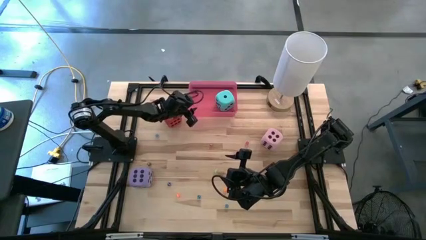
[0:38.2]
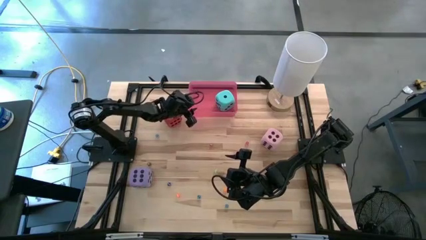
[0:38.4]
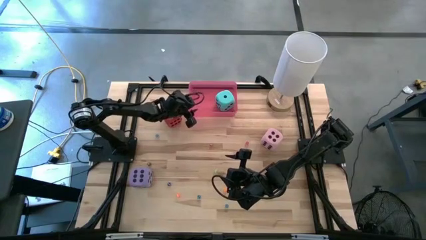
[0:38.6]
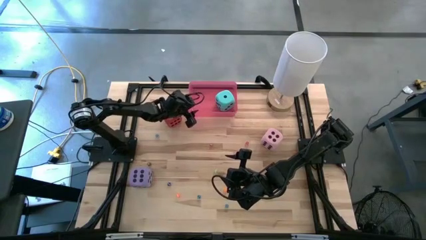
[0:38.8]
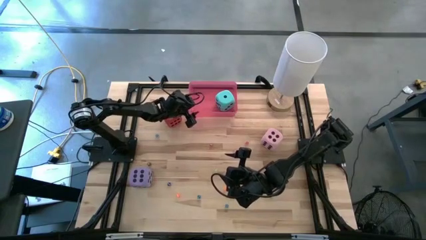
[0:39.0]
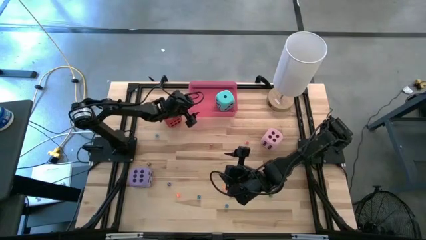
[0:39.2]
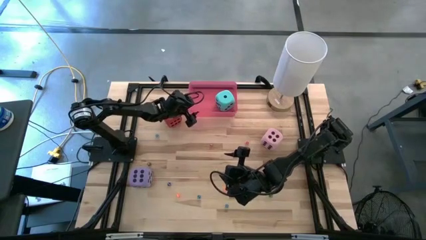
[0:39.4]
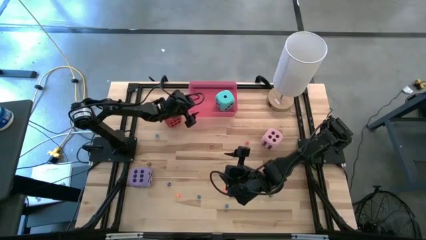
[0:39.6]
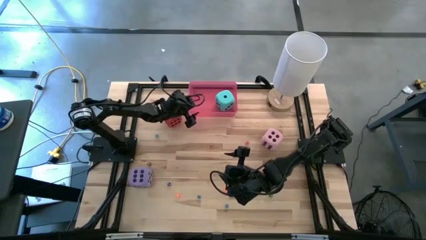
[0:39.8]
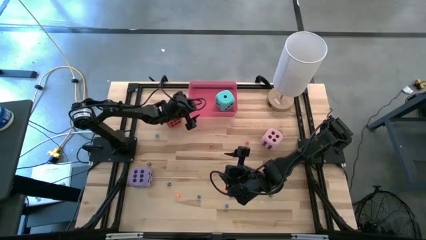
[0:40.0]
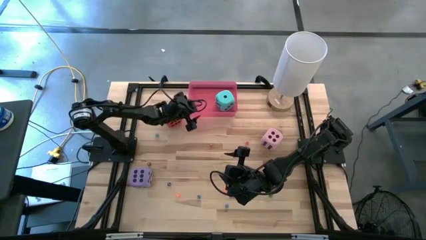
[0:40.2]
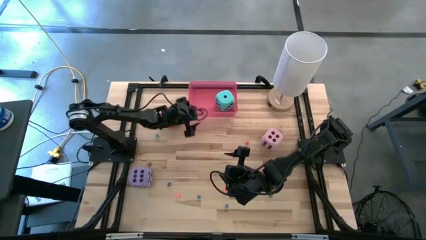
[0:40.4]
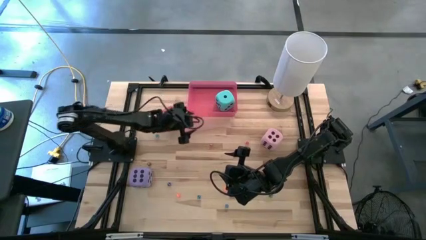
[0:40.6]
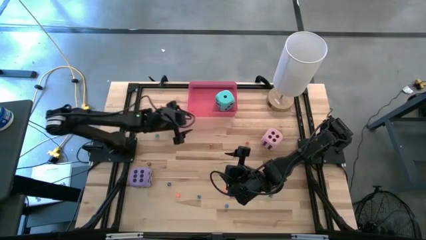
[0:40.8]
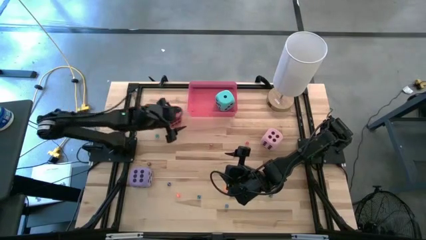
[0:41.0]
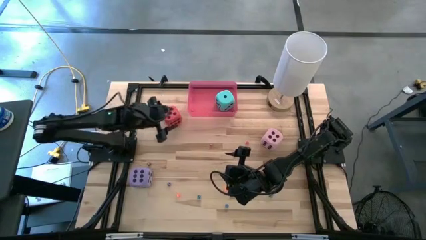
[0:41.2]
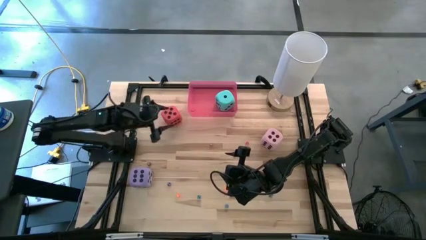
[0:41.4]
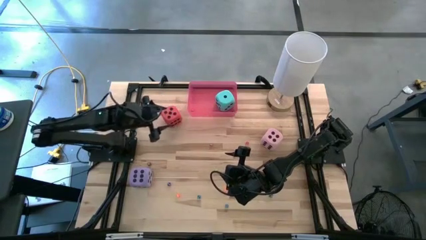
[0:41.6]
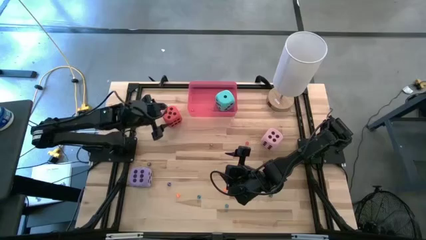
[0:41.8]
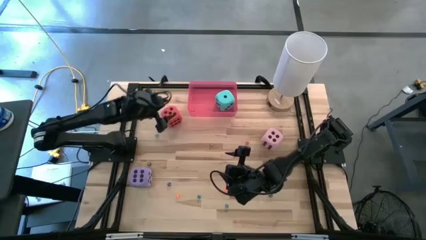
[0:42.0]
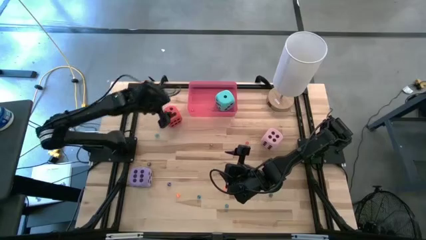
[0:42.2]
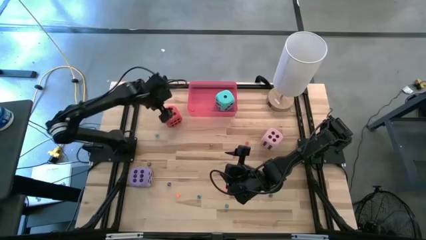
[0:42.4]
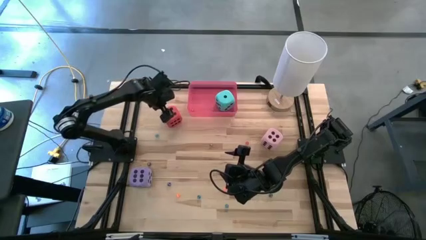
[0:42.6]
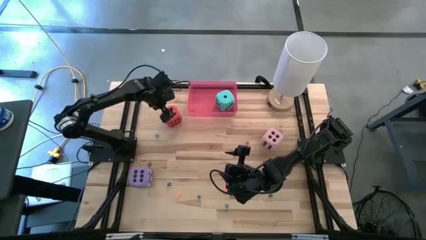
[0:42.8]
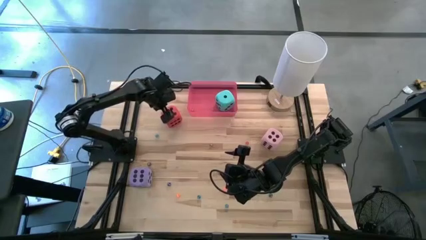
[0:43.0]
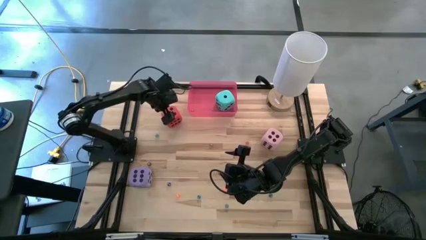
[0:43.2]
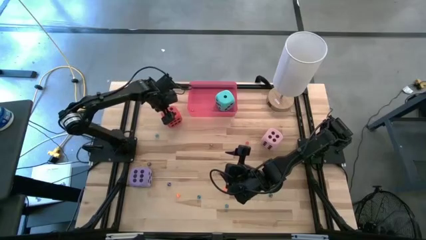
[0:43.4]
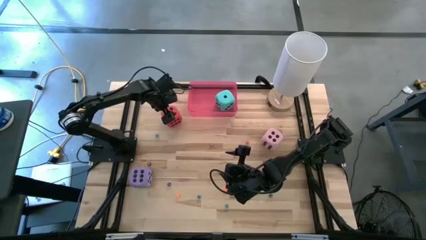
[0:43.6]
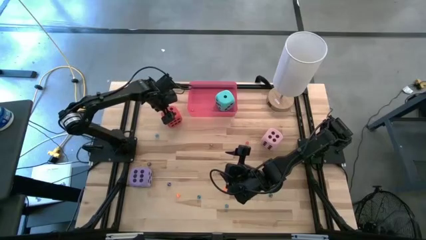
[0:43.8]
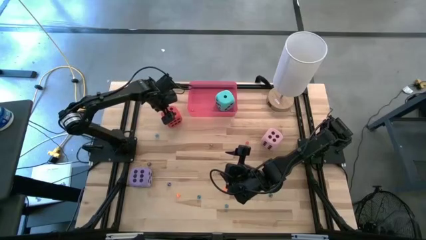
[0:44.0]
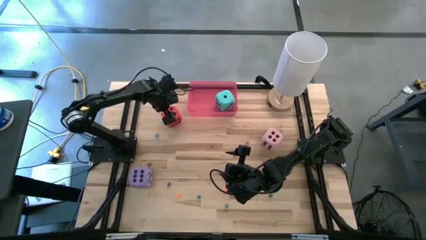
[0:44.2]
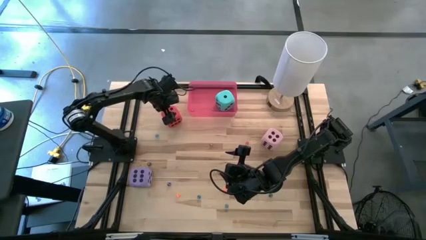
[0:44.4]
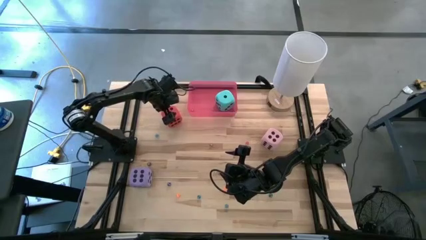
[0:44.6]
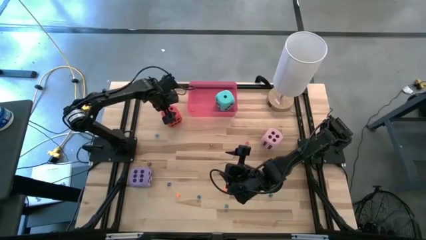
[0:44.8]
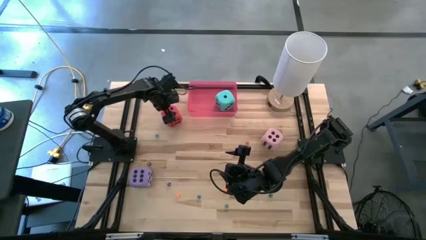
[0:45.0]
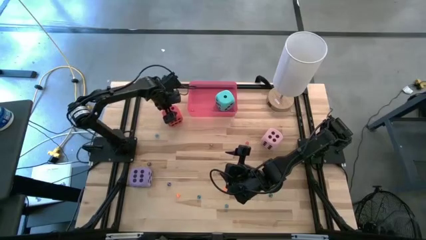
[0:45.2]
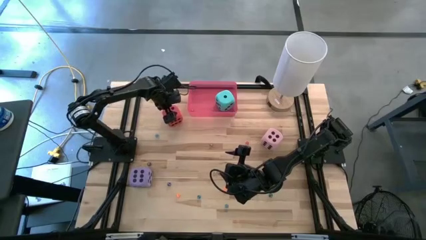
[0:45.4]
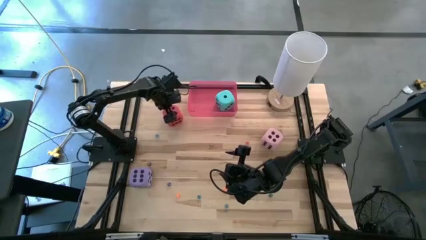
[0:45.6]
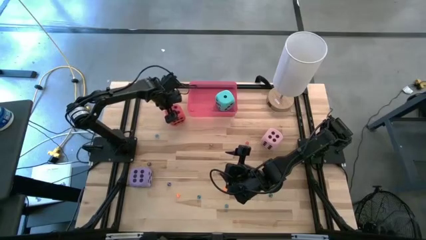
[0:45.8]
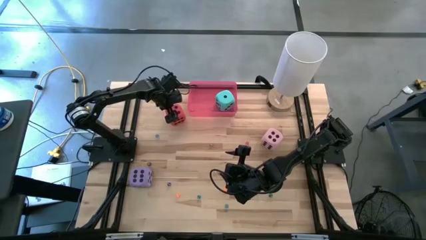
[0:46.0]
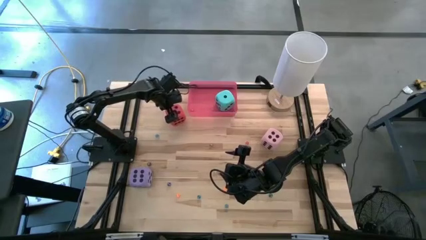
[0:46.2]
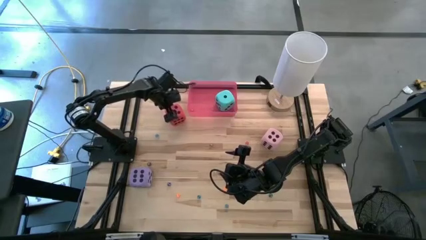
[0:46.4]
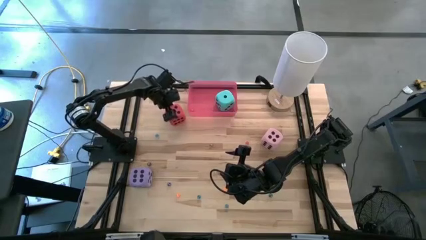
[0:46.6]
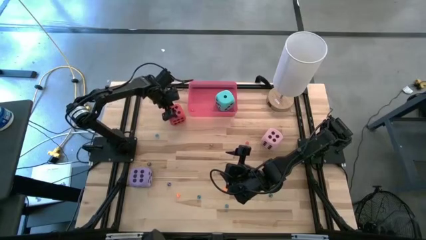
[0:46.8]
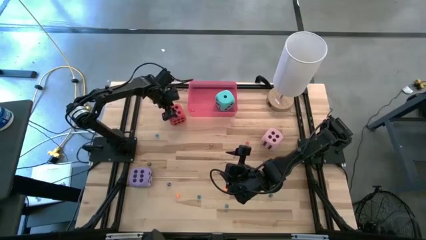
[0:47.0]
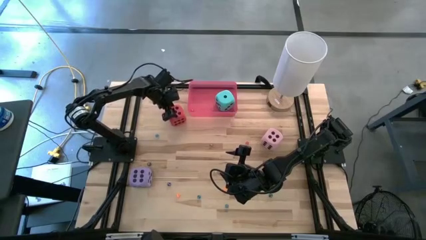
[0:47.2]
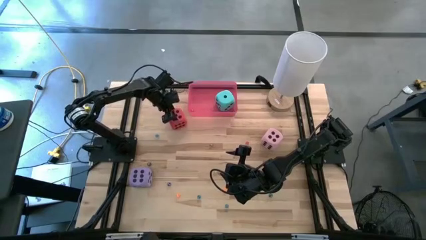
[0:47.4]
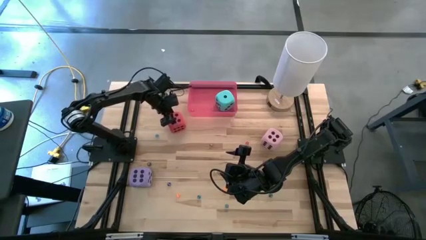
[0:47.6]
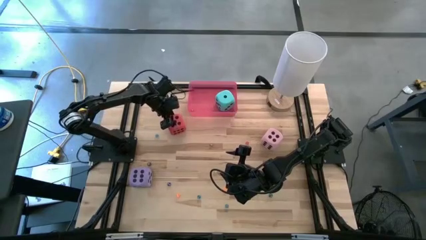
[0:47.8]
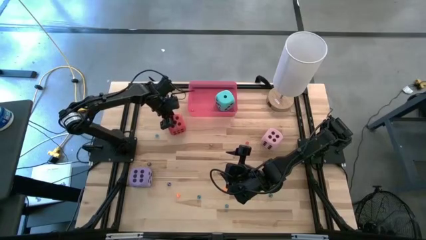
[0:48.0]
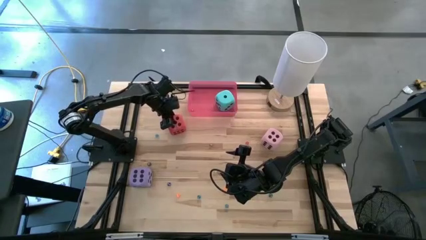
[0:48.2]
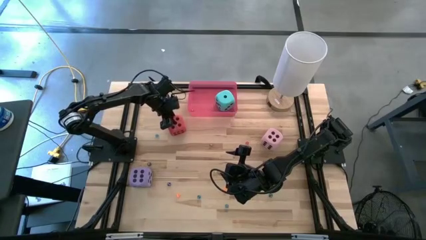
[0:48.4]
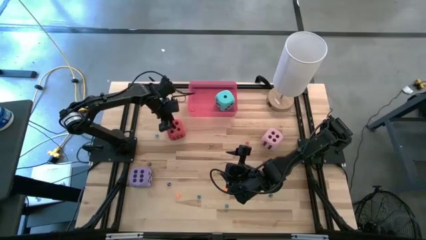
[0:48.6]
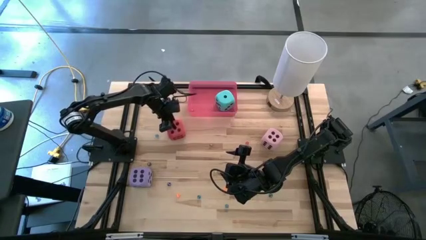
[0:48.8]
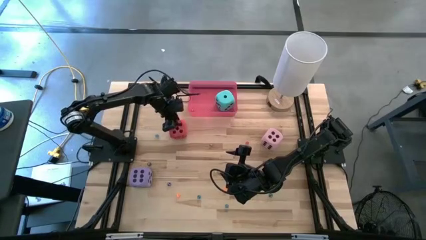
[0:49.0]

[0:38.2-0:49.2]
Task: Pick & Place Dice
Put the large red dice into the pink bin
